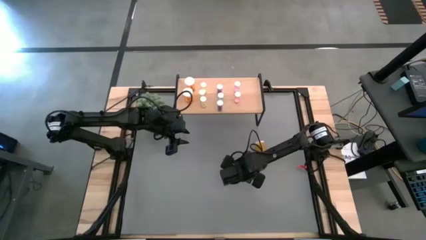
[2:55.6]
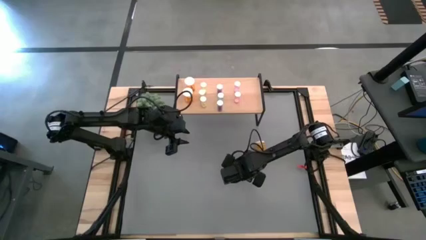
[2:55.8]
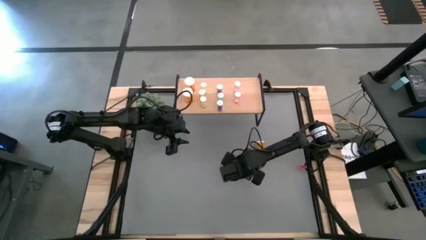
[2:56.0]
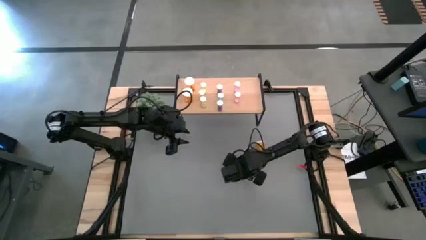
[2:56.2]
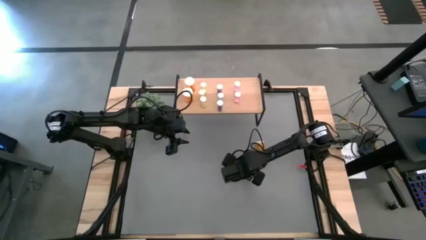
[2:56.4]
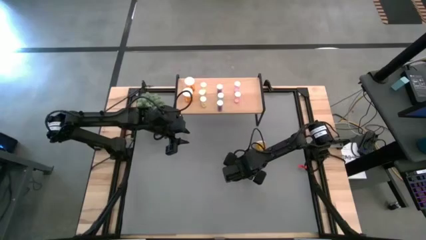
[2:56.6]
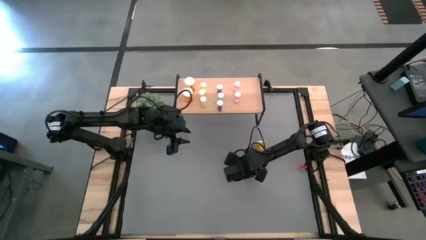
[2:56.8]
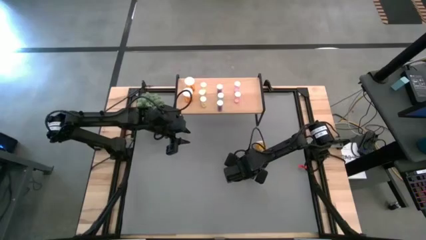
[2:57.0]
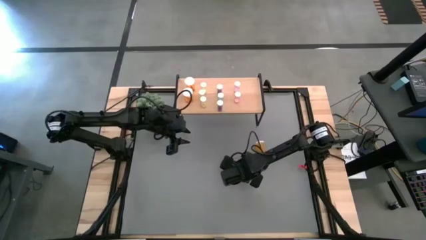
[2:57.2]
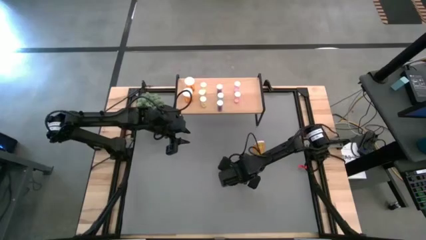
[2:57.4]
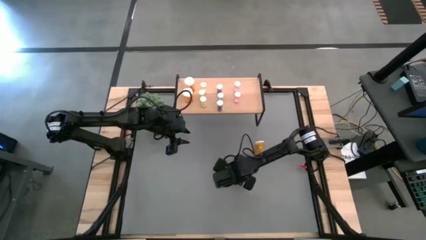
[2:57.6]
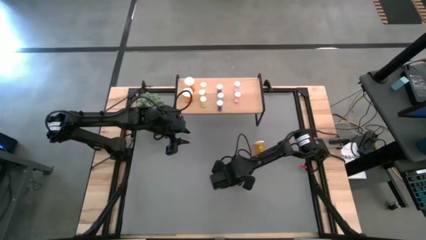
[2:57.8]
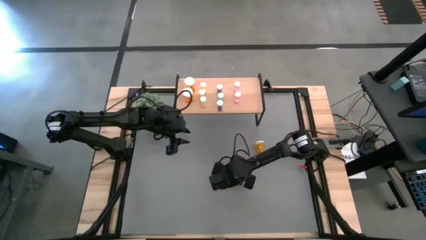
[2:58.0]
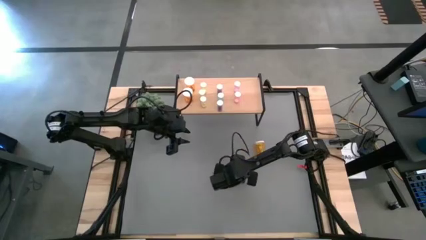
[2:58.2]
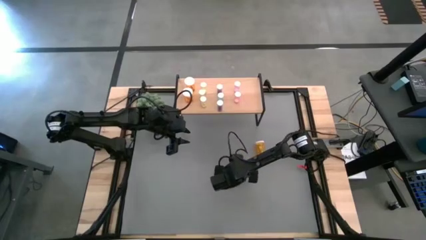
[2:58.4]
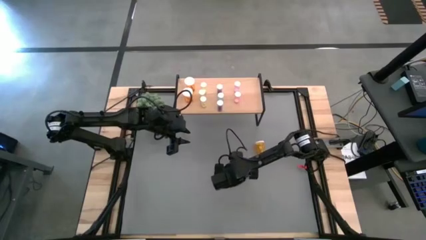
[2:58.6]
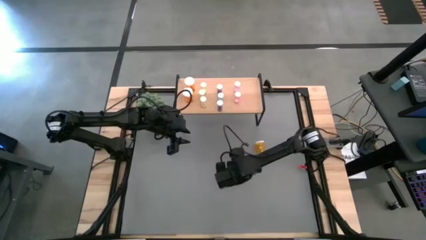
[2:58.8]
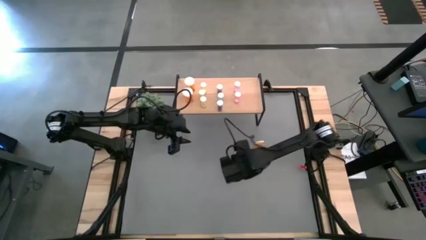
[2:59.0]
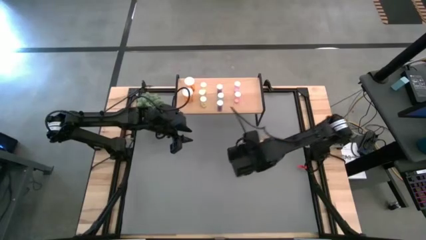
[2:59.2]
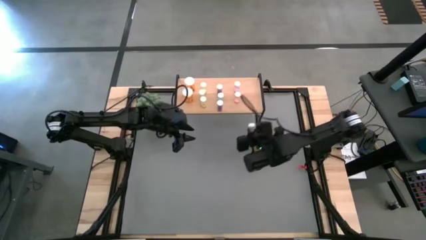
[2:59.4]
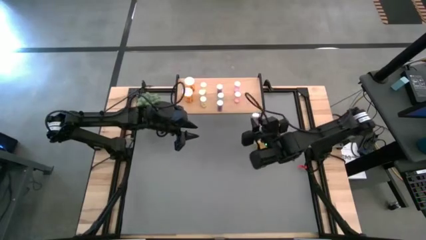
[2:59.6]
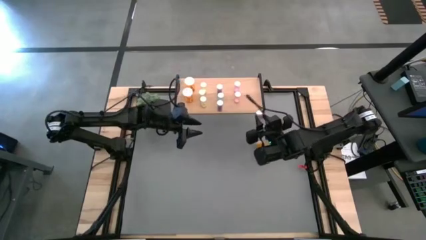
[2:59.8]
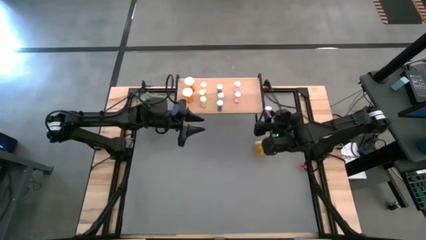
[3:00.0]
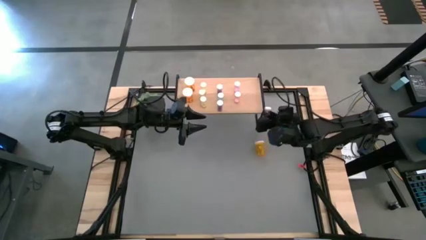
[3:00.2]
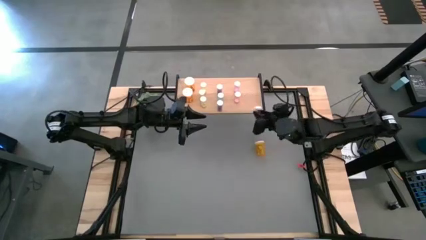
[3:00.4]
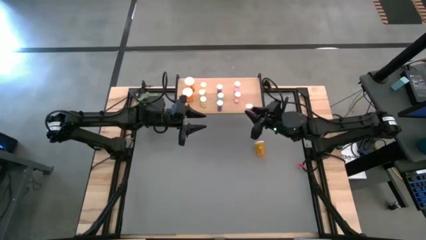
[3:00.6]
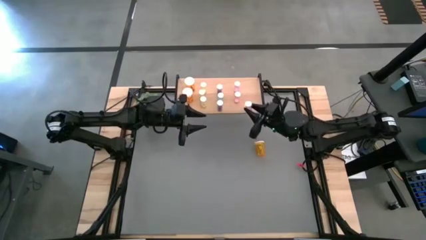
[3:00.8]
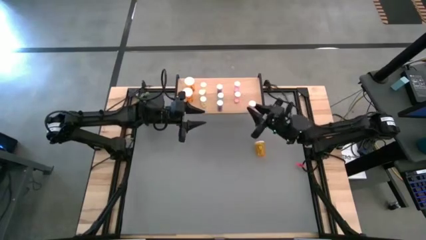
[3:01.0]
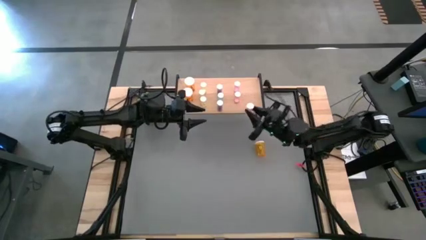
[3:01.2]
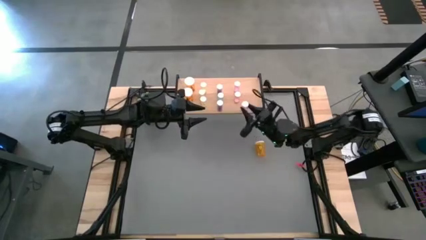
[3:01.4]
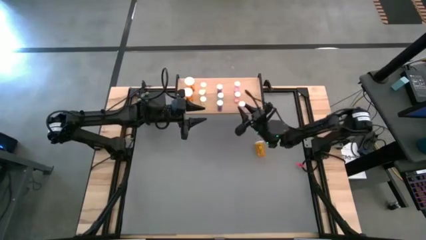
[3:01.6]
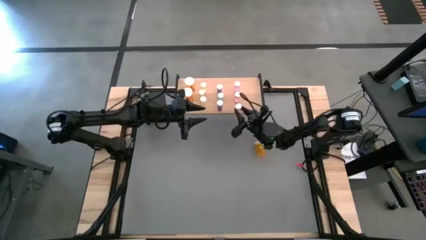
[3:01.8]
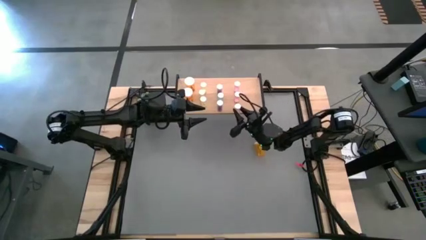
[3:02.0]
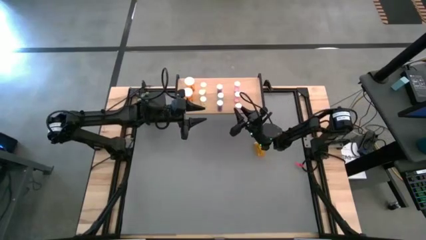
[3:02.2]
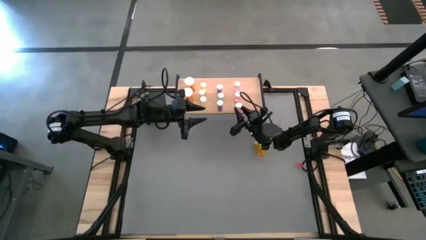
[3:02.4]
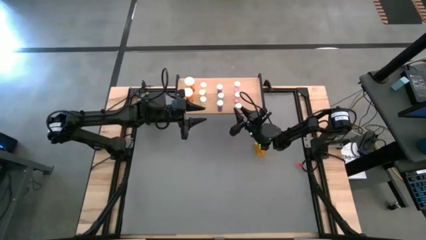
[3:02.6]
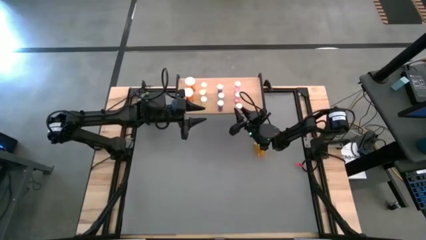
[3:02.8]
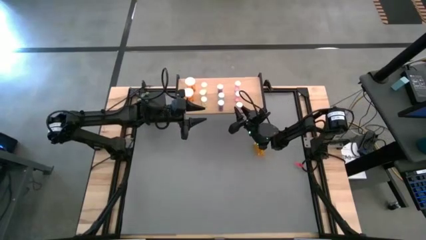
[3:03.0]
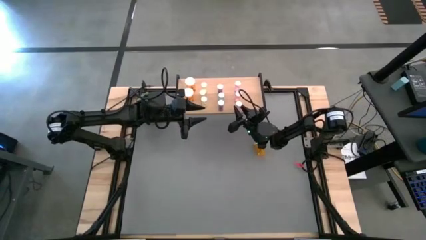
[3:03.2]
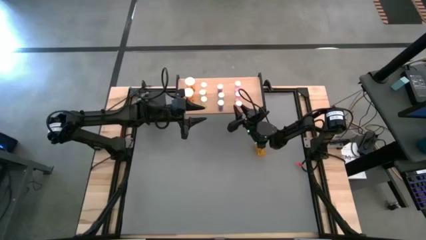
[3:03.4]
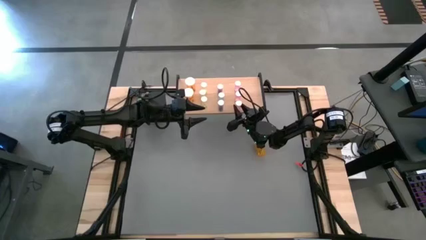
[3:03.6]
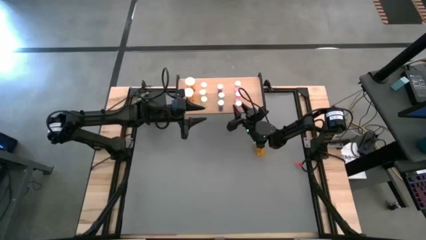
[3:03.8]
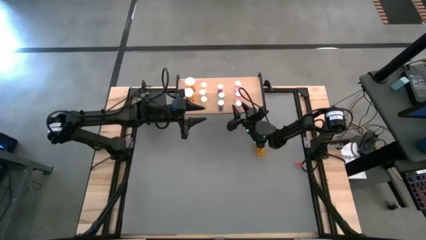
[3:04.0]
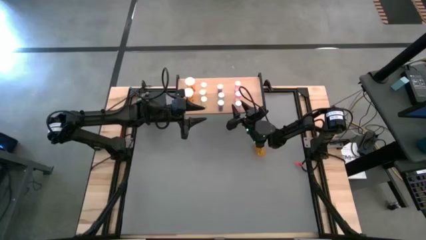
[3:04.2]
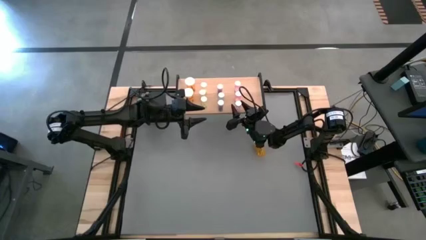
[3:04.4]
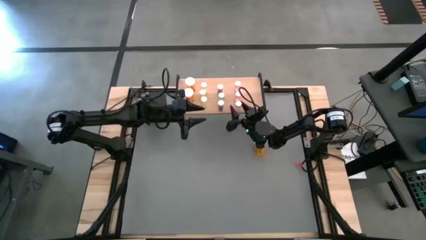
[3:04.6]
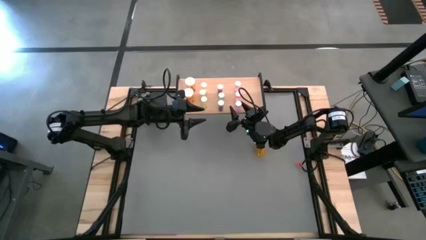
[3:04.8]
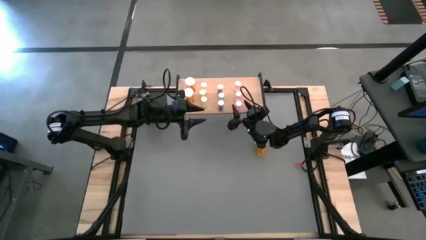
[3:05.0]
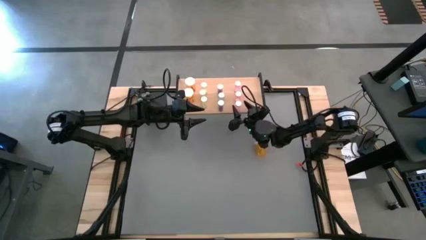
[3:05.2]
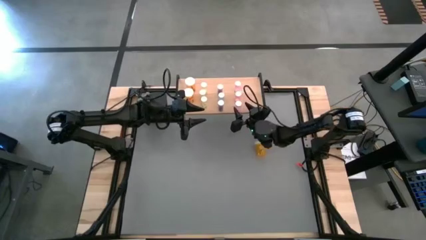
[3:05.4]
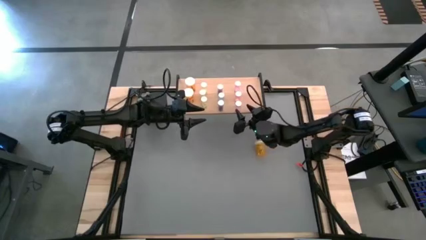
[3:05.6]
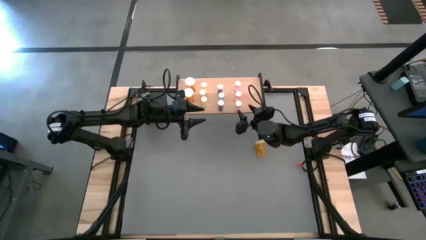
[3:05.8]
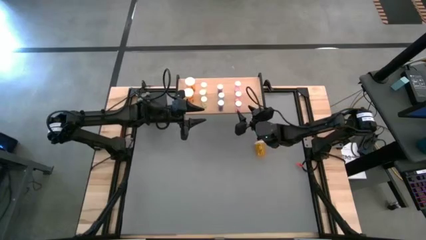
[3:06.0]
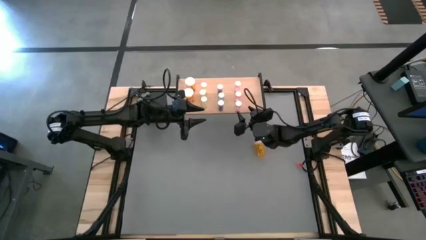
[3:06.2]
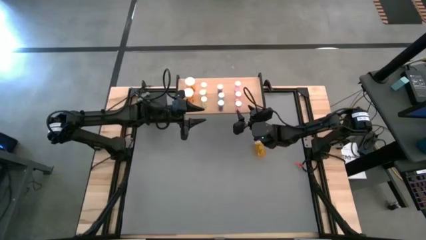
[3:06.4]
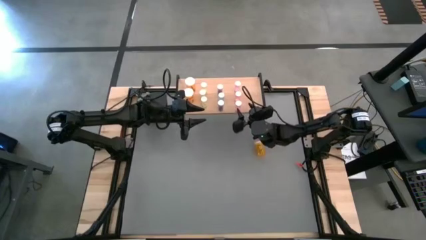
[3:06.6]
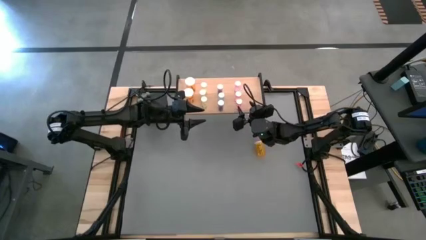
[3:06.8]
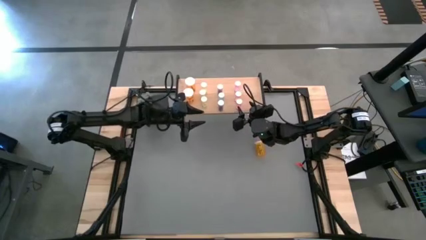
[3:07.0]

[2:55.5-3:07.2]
Task: Pick and place medicine bottles onto shelf by color
Put the pink pill bottle on the shelf aligned with the other pink pill bottles

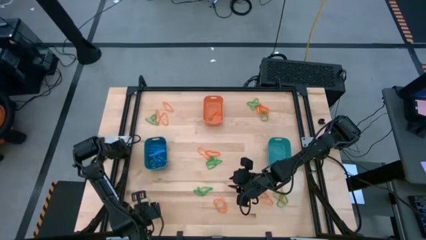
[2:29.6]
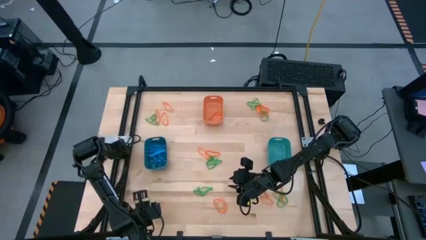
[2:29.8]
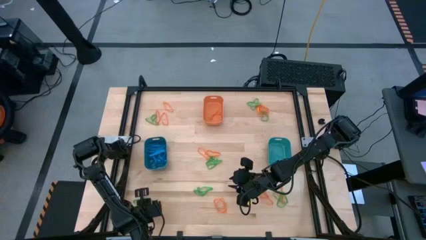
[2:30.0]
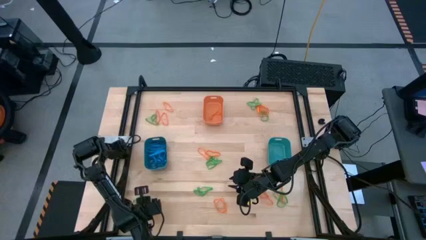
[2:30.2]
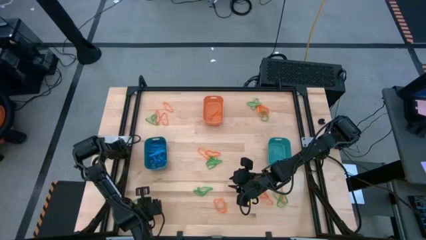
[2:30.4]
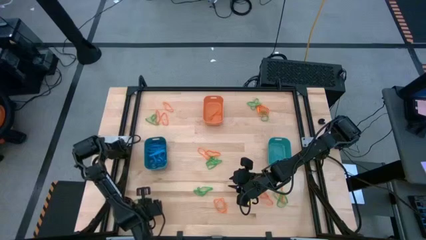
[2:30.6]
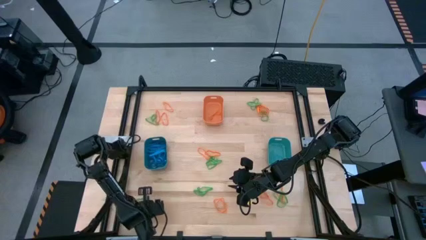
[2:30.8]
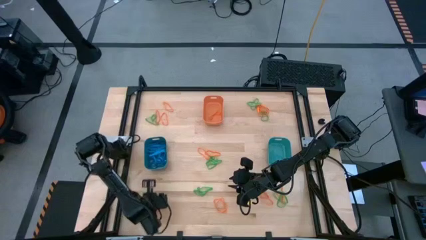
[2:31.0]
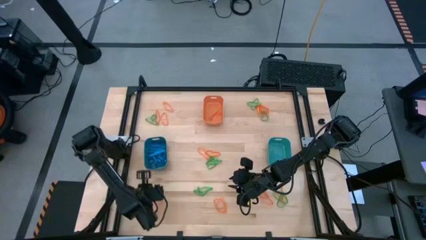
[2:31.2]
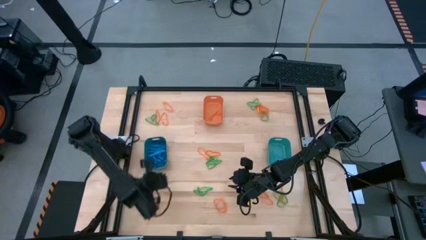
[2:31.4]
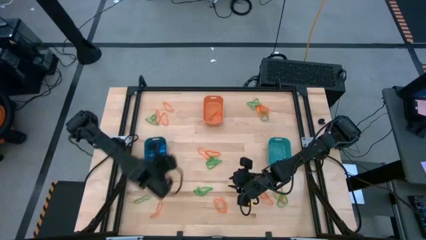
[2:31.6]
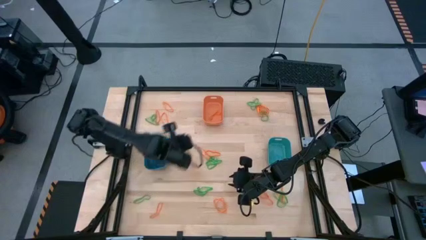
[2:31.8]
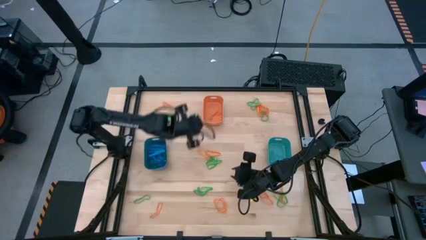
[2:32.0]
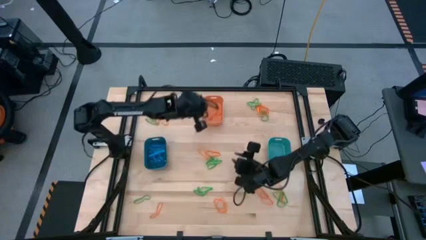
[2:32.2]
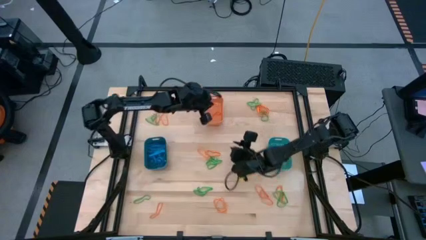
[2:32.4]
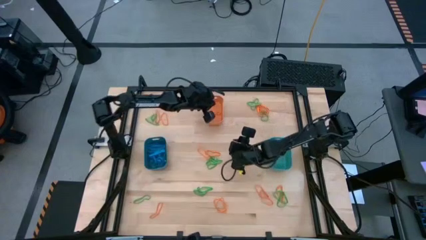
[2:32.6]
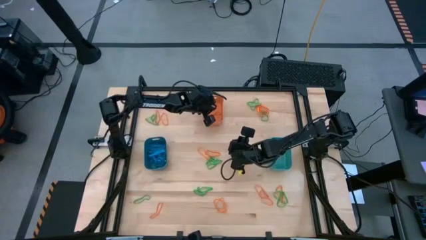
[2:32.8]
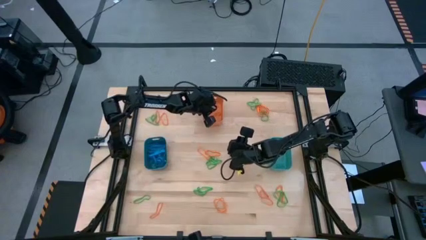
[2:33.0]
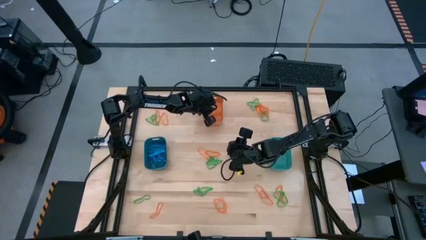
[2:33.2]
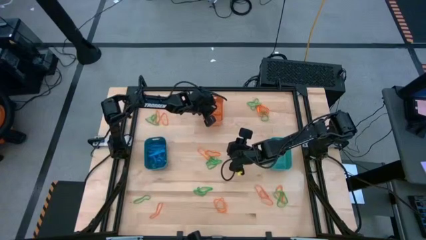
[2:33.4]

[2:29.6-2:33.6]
Task: Sort rubber bands into baskets
Put the orange rubber band into the orange bin
